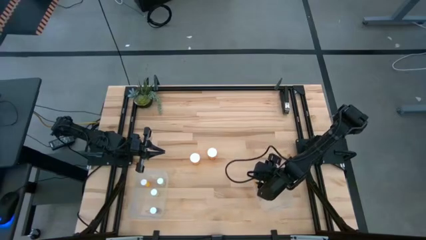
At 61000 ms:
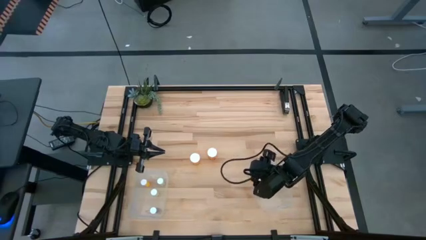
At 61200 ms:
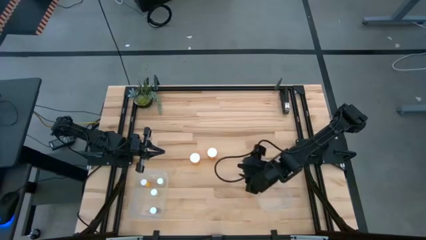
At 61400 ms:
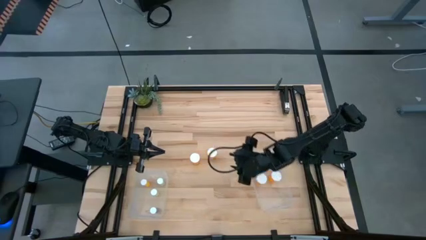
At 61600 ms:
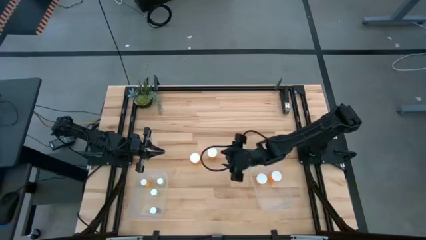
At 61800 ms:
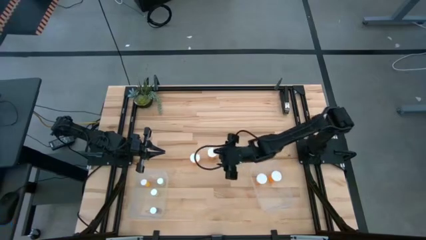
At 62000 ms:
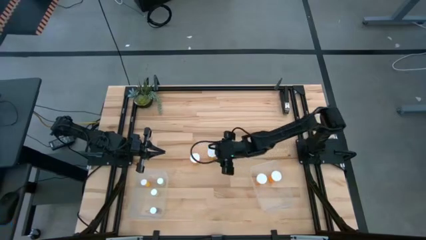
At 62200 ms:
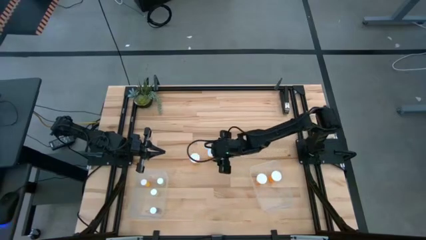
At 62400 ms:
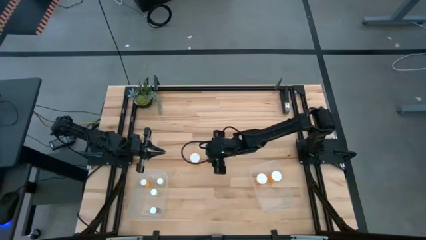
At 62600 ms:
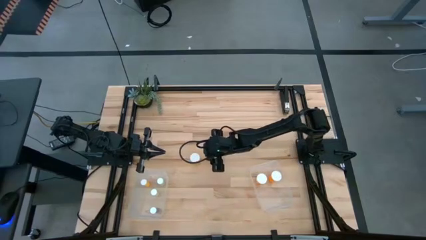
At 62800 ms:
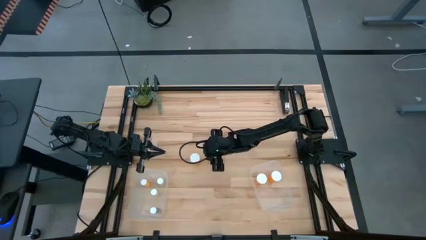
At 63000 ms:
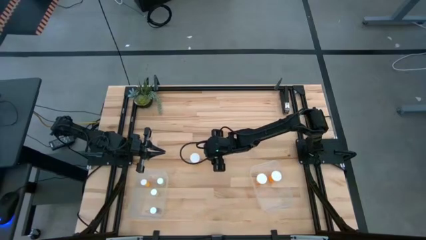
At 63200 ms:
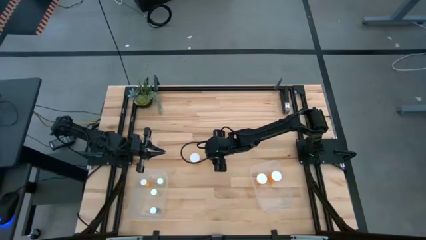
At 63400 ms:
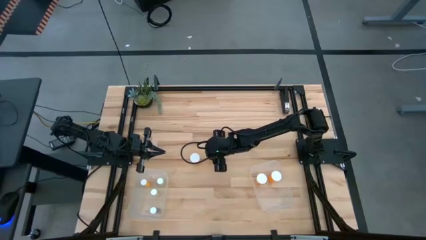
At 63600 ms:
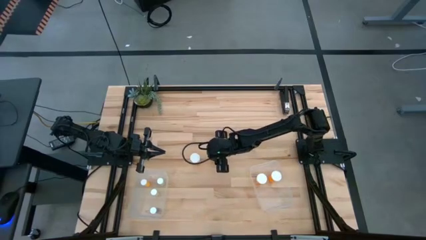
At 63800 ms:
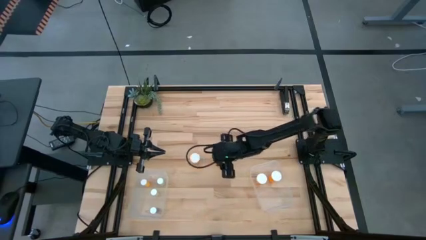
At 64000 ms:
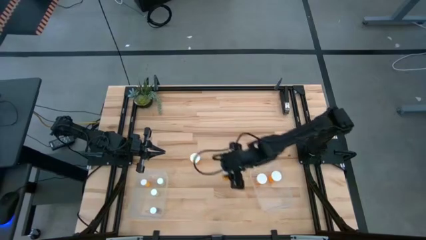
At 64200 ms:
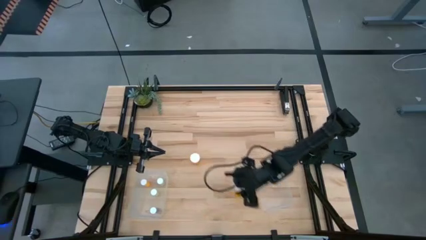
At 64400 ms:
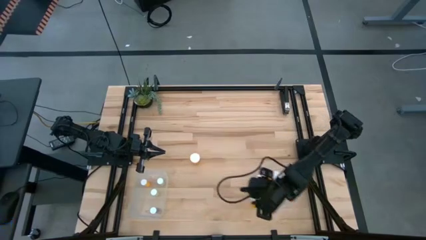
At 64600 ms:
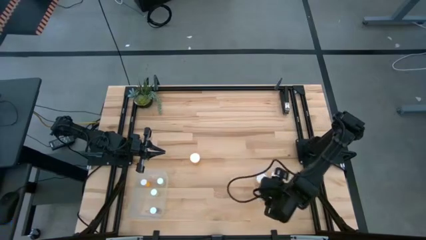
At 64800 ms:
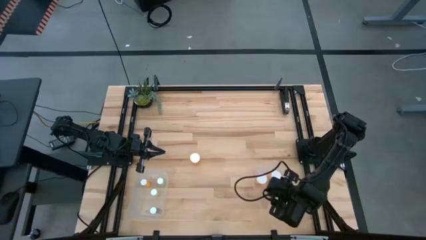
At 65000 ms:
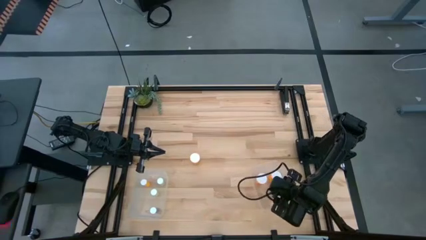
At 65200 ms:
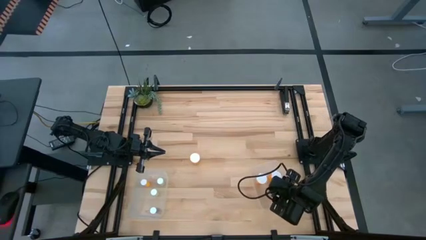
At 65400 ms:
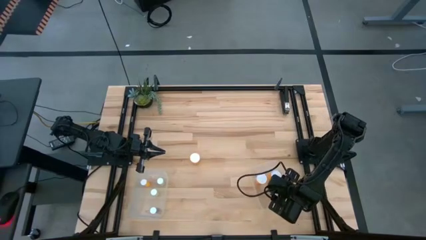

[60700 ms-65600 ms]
Task: Pick and place medicine bottles into bin by pill shape (circle, oval)
Put the large orange pill bottle into the right transparent bin

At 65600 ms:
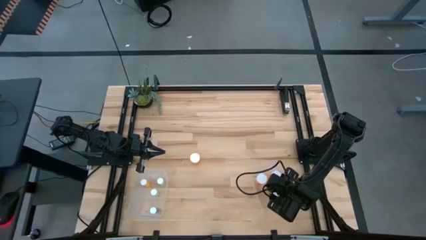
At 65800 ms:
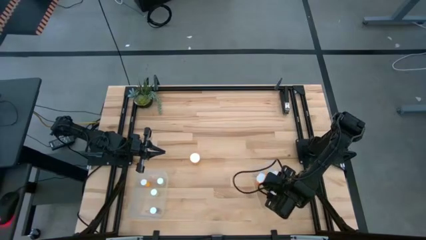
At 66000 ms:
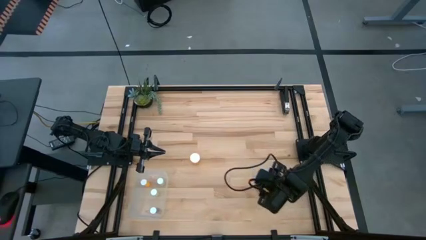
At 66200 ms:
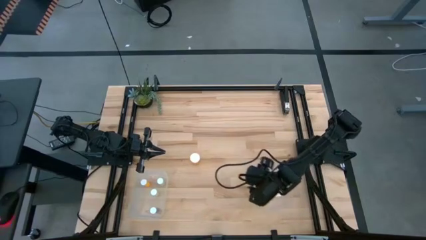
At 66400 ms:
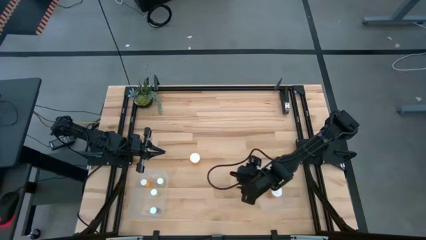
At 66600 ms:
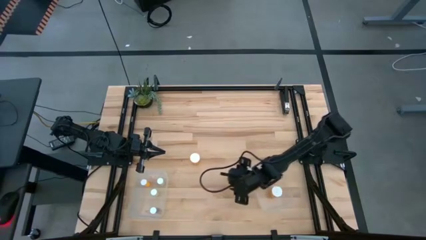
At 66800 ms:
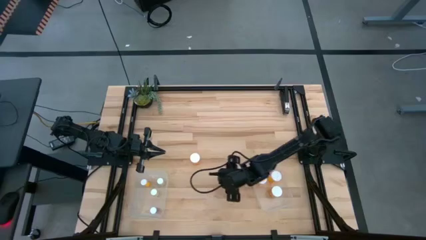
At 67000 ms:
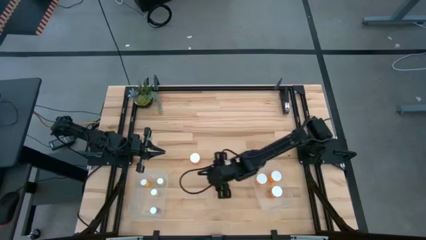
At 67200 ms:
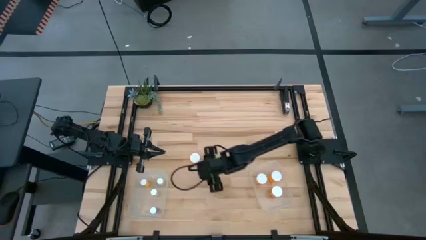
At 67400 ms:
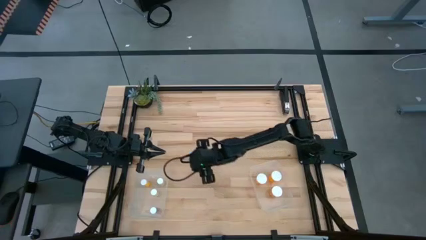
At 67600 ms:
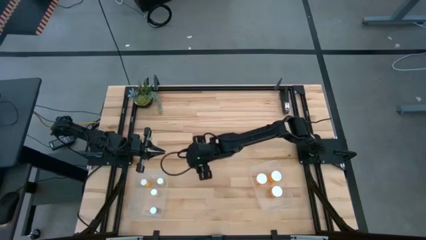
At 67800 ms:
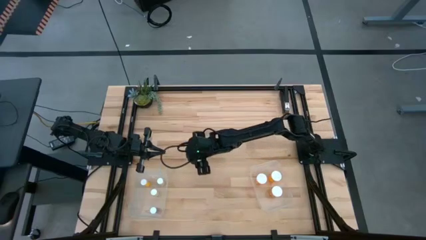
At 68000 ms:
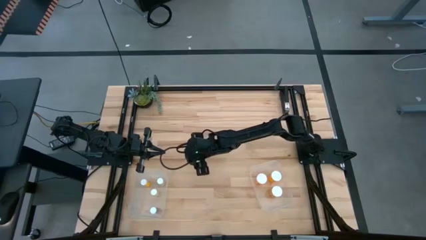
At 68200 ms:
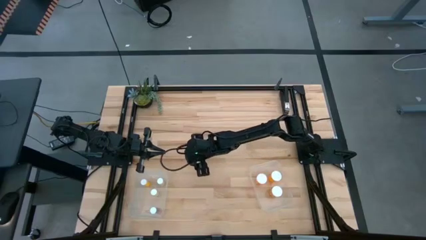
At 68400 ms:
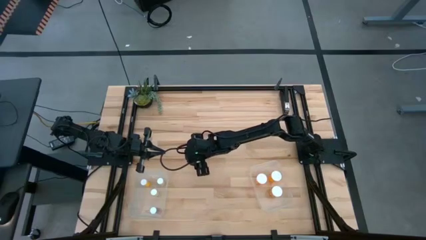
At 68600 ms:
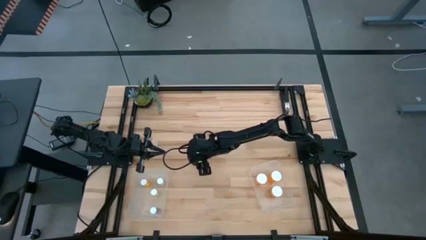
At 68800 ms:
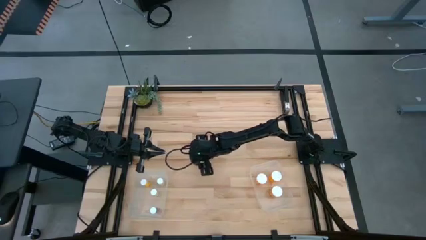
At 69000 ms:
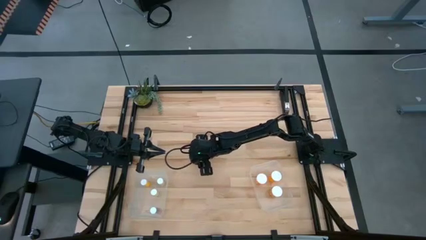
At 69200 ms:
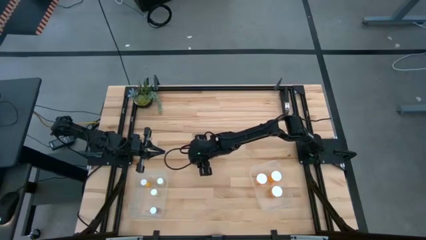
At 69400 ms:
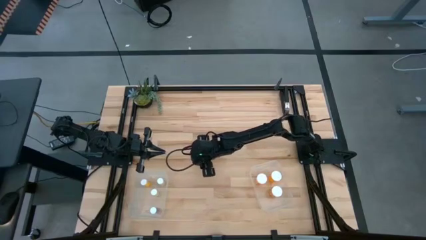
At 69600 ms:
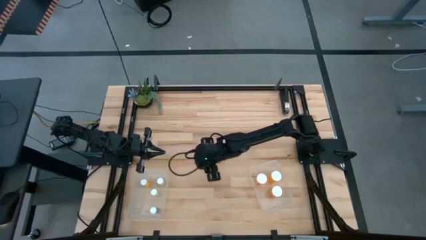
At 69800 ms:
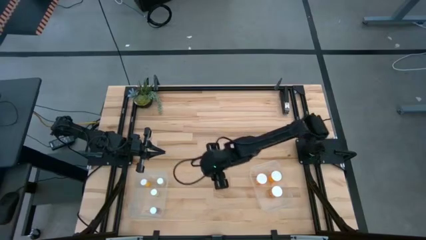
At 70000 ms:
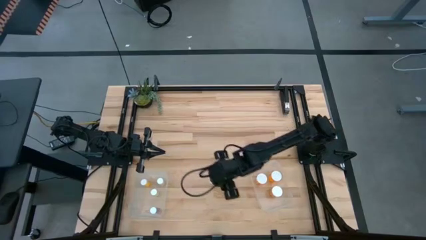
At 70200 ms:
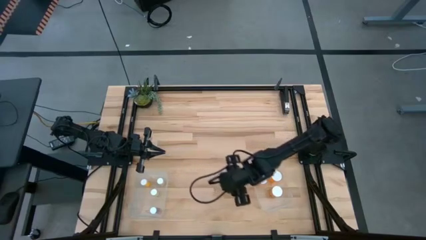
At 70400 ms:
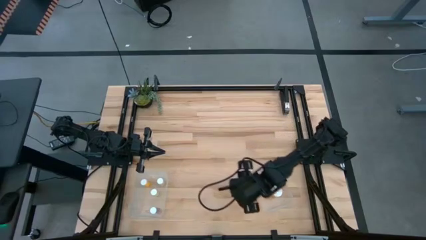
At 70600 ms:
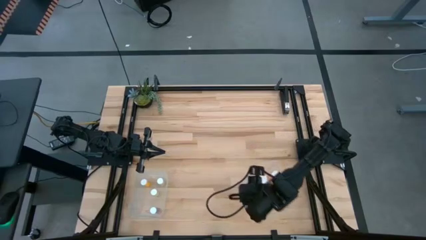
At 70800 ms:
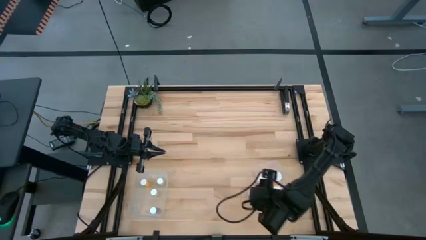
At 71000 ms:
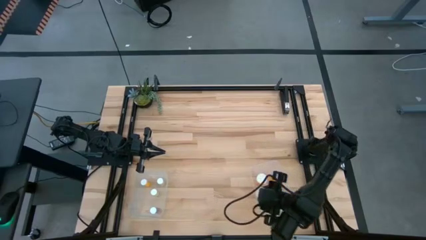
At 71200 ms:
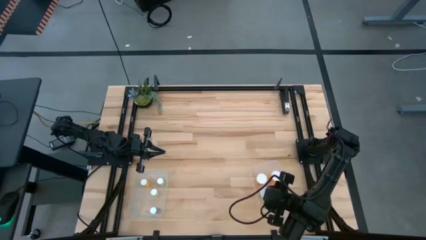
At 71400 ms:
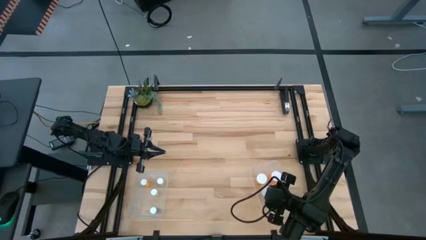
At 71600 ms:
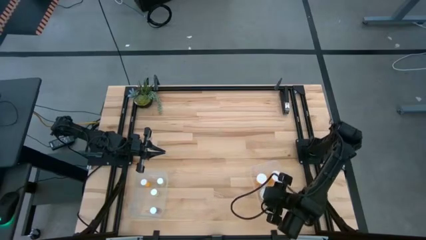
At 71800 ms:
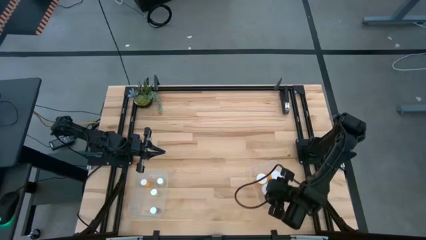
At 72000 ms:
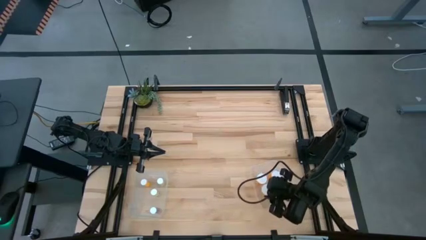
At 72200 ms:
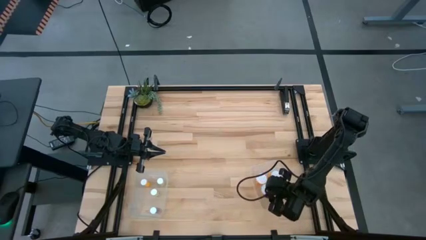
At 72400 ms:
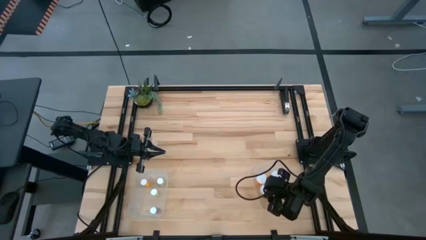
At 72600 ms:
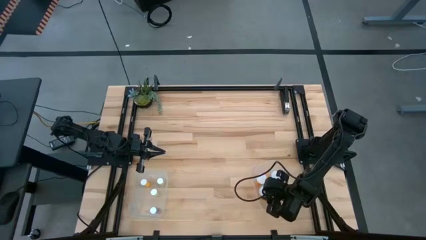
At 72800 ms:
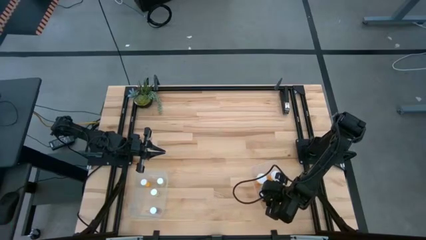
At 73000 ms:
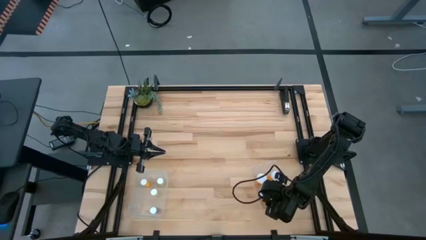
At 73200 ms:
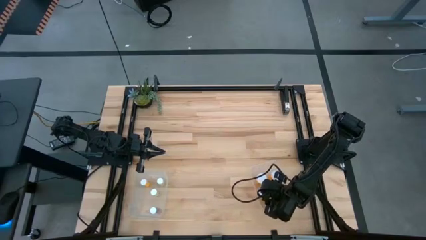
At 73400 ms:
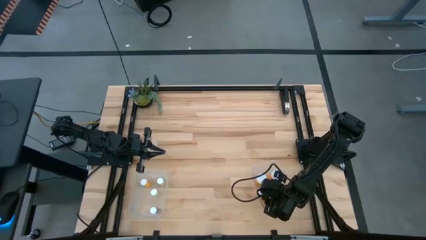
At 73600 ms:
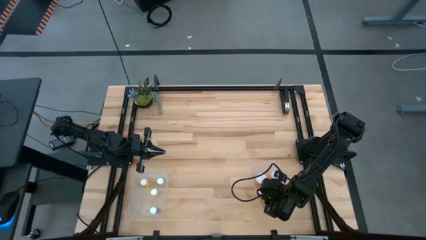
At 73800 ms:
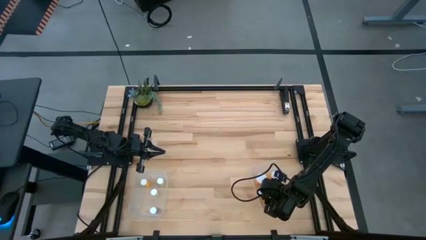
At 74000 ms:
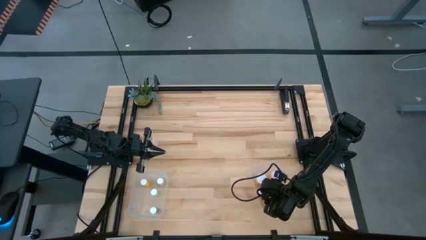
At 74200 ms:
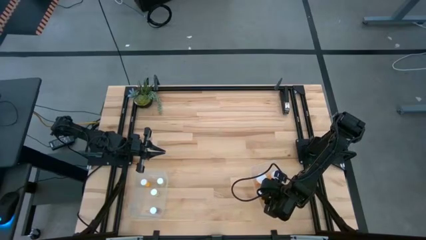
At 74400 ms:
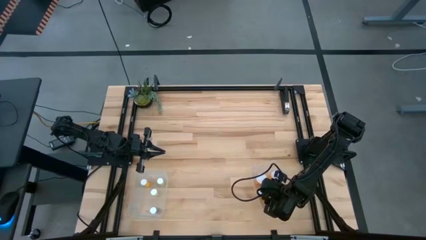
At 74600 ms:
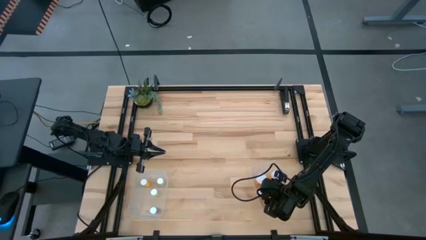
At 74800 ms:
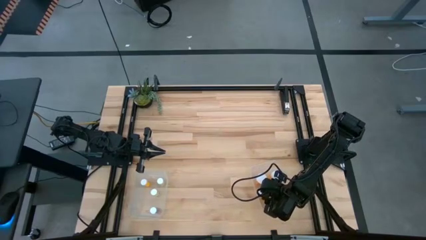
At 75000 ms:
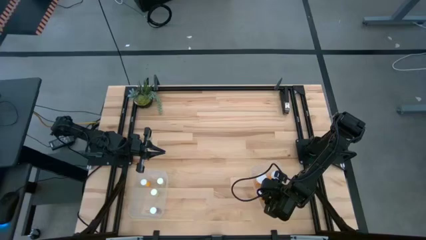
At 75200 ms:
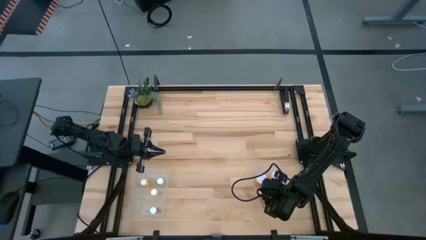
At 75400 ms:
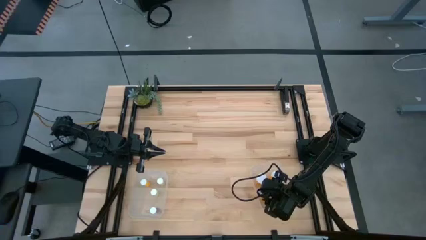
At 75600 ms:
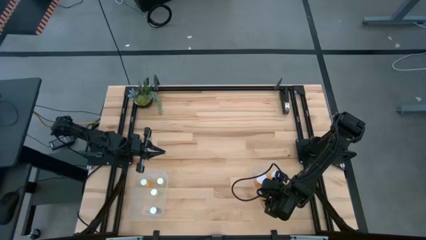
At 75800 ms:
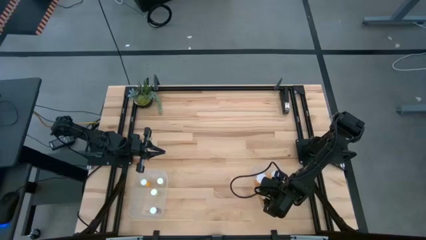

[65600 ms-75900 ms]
Put the large orange pill bottle into the right transparent bin

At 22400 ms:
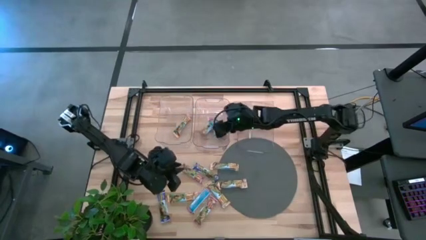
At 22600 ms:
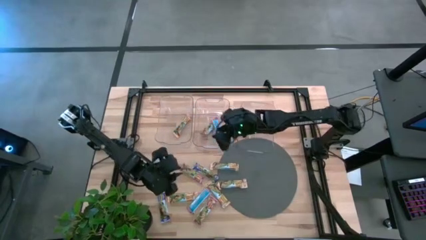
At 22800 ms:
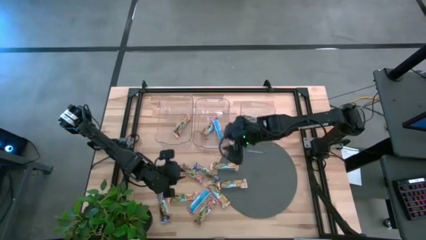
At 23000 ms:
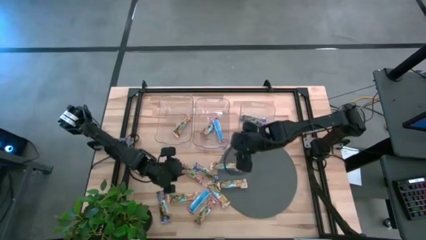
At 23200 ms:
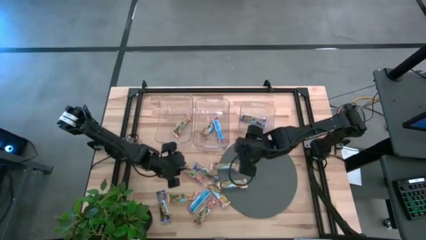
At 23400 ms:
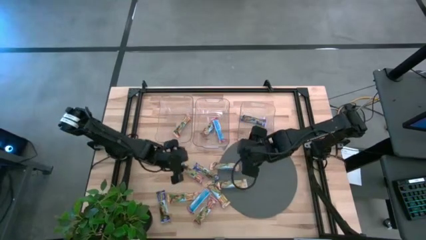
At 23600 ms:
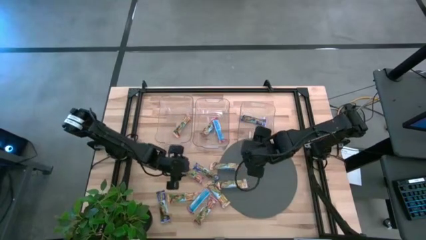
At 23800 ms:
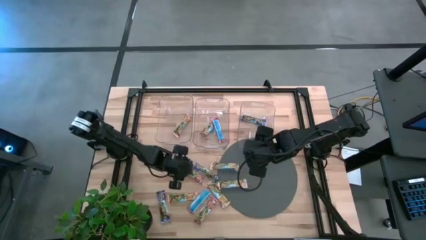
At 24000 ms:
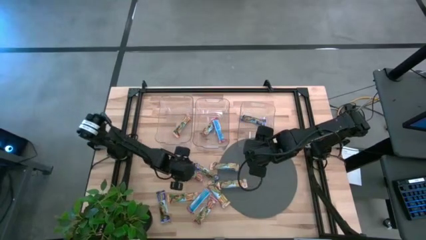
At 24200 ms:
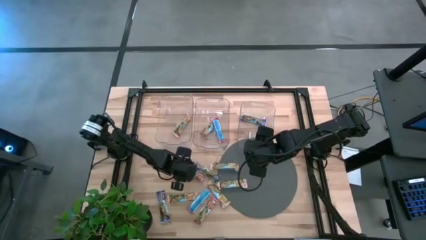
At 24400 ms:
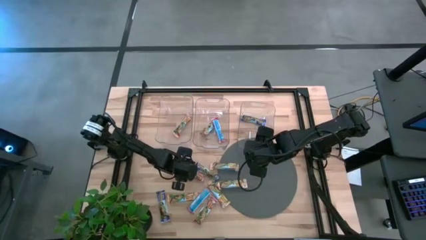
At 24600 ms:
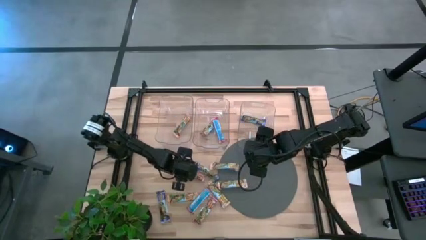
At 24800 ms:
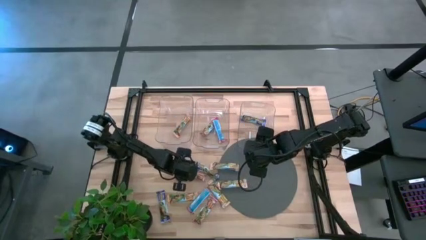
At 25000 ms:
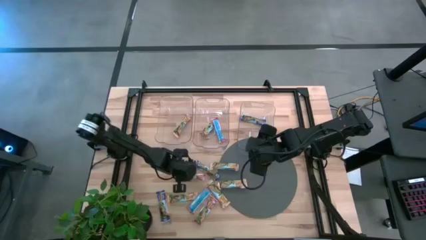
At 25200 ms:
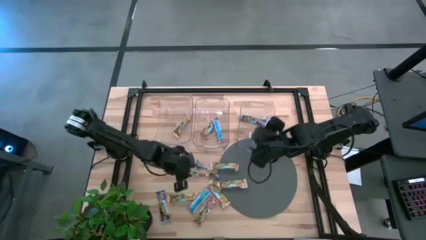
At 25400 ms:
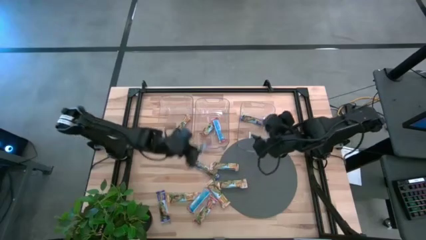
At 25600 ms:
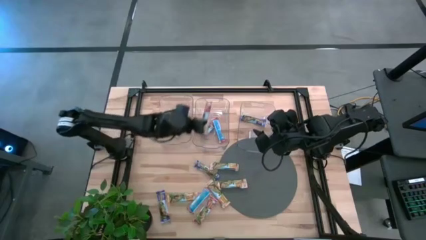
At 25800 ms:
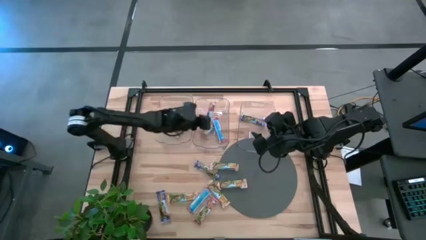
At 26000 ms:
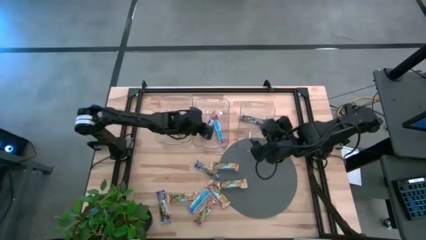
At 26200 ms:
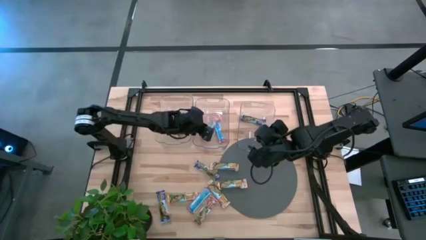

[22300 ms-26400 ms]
Task: Pick and place Granola Bars by type
Put the red granola bar into the middle transparent bin
